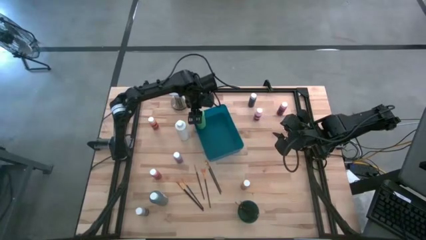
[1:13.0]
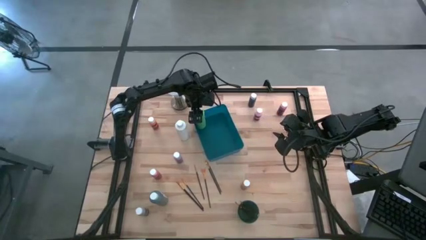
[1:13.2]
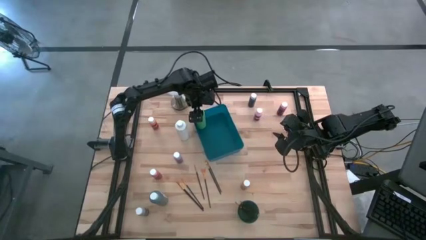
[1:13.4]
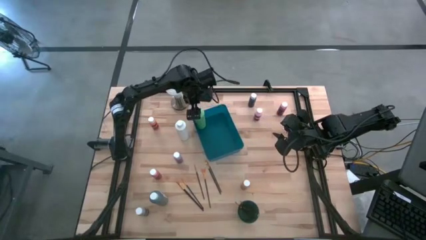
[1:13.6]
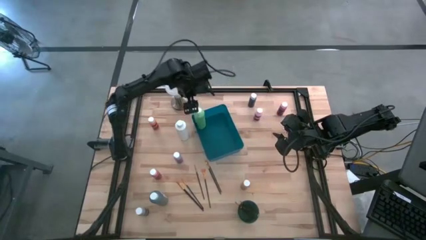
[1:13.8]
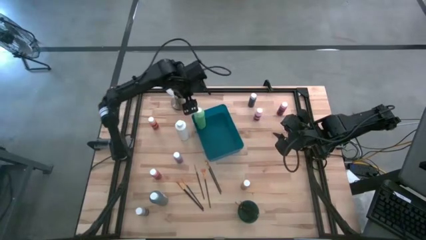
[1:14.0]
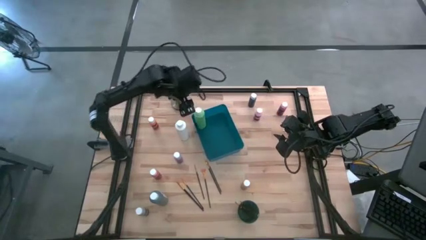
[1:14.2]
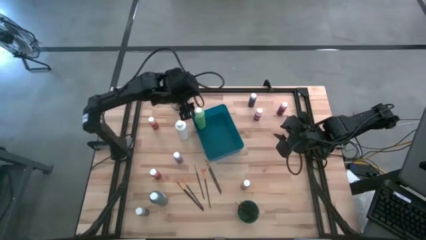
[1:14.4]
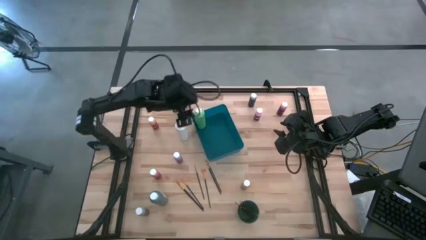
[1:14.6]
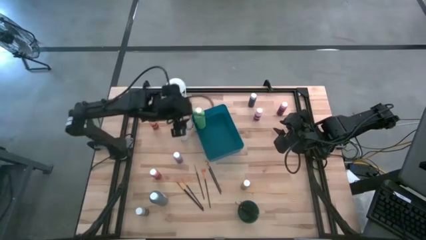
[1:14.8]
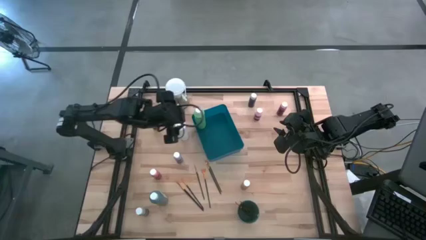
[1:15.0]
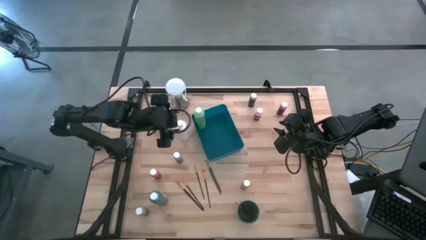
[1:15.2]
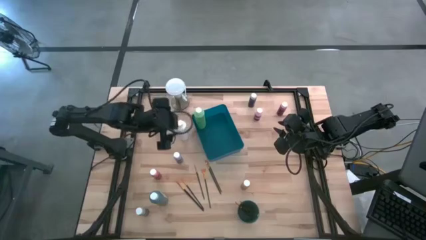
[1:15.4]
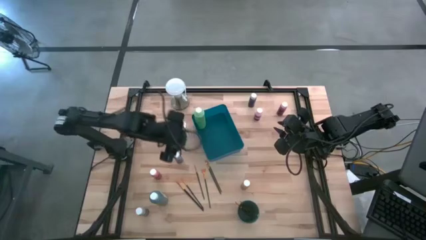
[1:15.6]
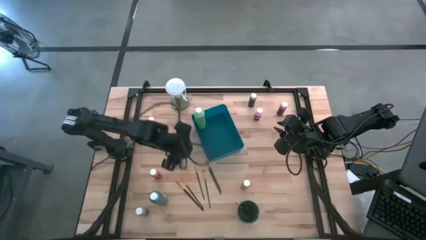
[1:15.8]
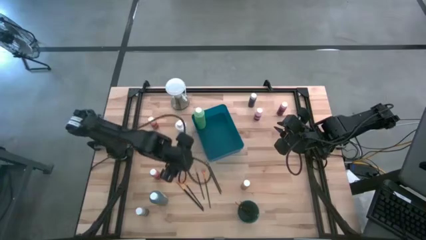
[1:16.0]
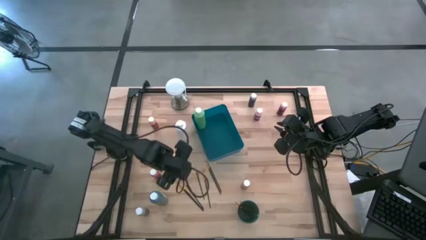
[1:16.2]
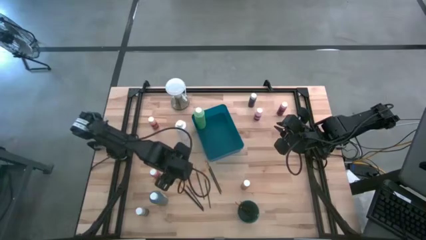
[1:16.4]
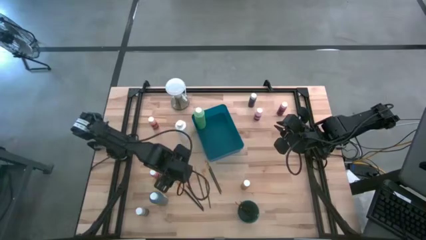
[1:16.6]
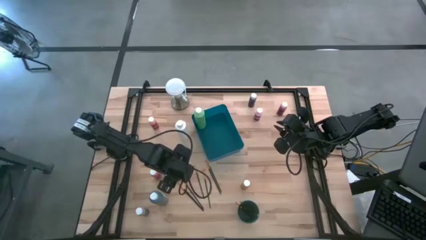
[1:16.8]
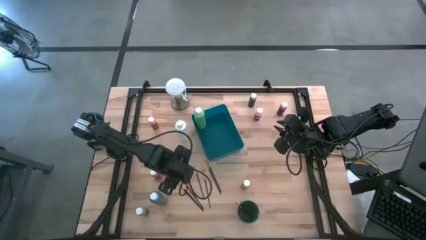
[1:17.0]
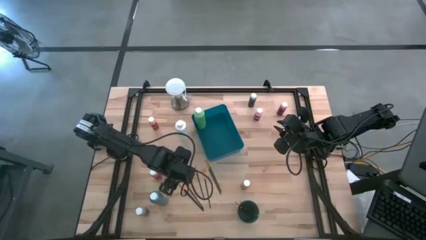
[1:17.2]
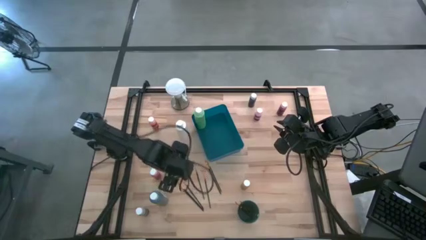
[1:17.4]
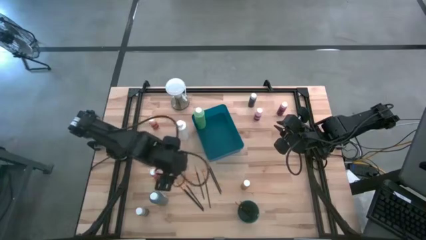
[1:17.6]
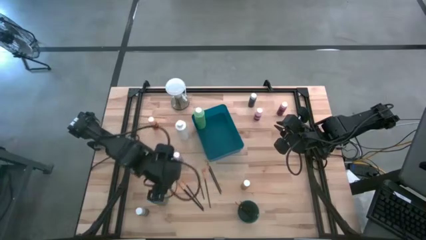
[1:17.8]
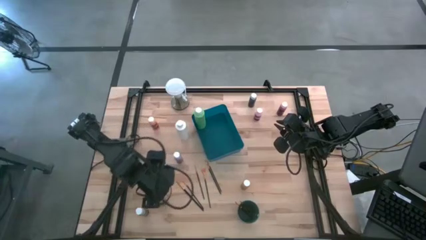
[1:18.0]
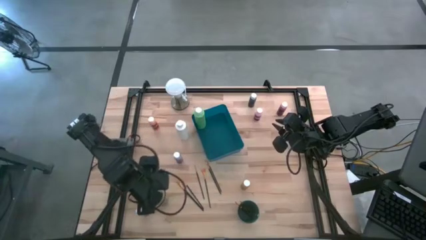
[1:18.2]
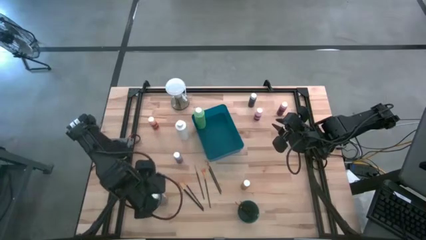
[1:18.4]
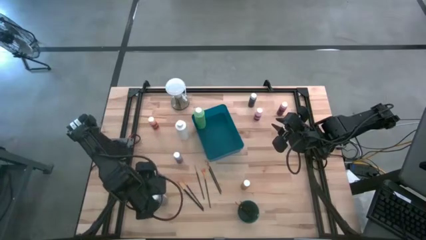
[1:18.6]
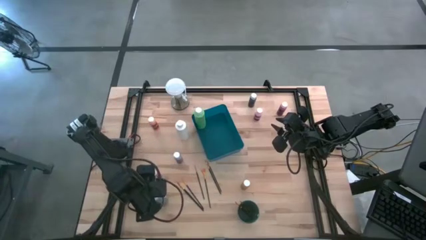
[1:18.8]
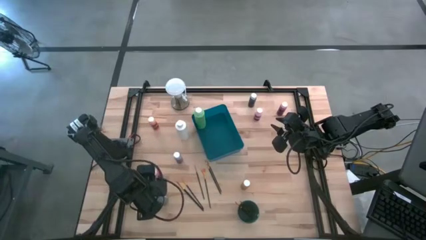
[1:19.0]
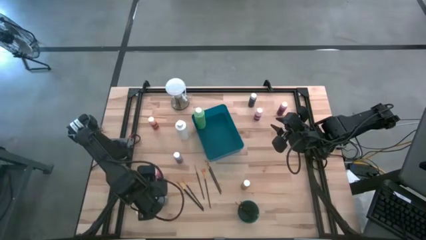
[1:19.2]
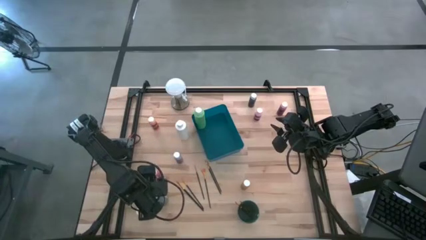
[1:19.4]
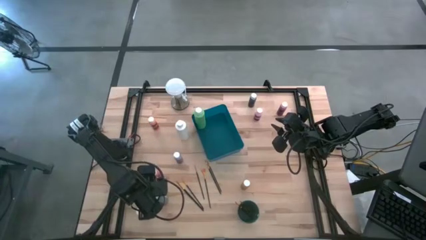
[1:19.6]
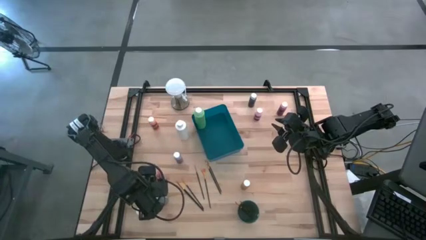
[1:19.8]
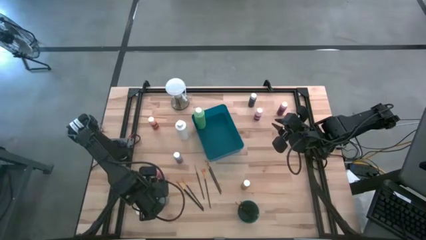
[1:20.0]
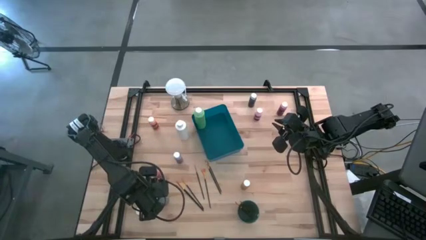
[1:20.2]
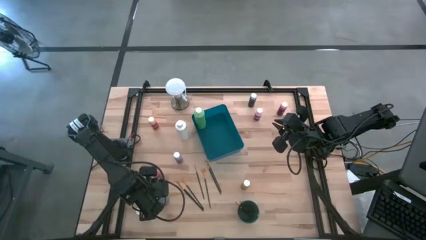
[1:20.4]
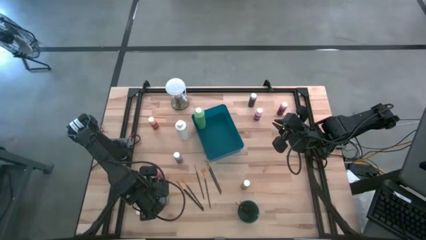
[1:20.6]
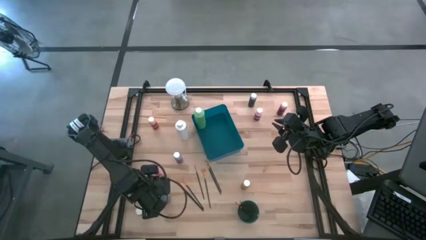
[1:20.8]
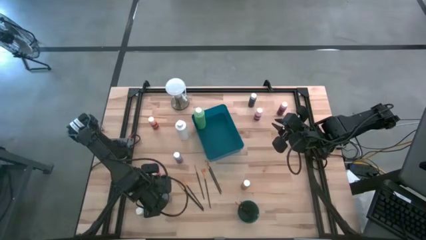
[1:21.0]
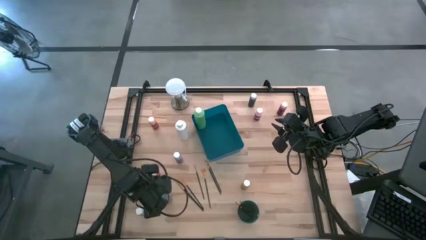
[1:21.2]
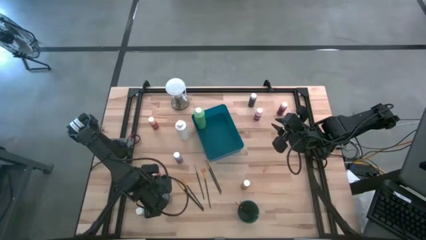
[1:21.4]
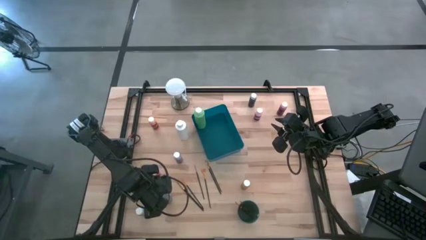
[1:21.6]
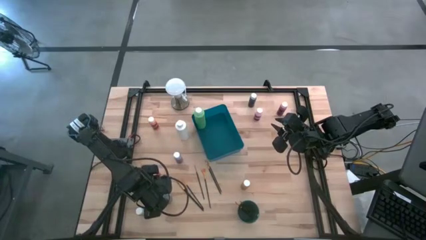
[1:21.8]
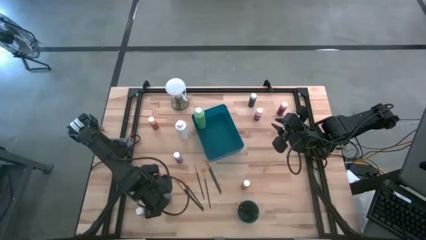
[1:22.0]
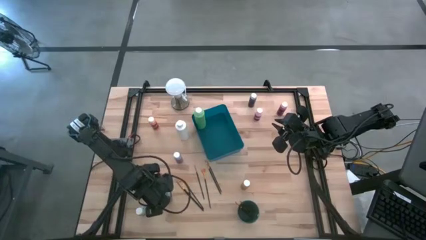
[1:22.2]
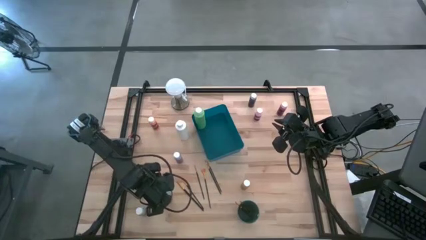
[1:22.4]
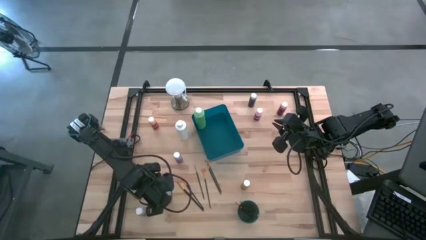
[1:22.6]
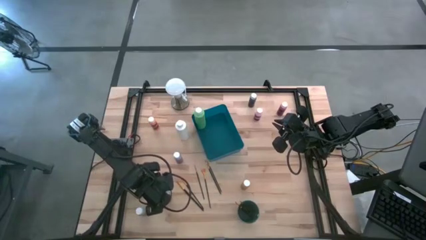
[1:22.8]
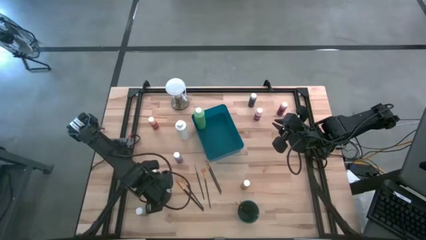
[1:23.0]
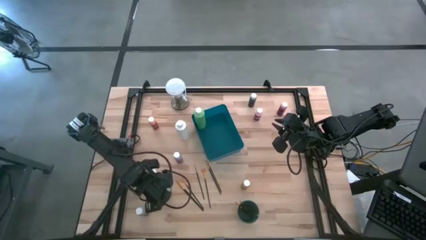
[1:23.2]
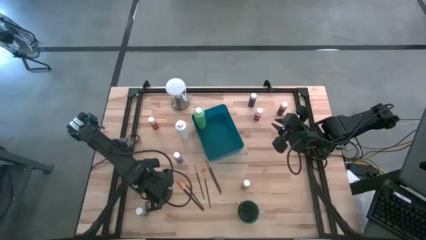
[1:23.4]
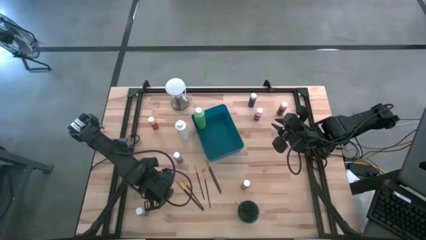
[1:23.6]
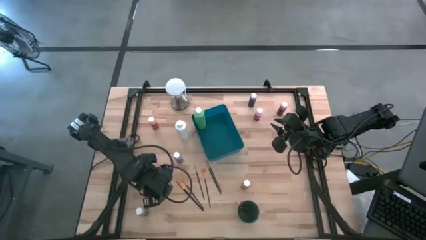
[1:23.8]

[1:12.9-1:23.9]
Task: Pick & Place Paint Supplies
Put the blue paint bottle into the blue bin
